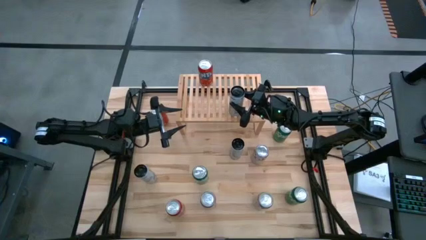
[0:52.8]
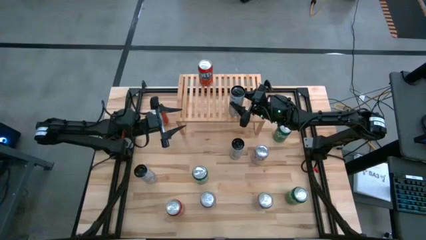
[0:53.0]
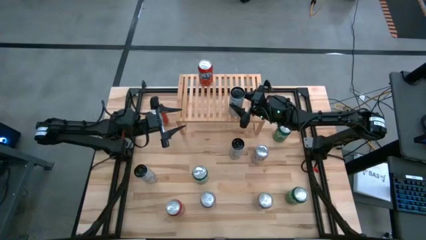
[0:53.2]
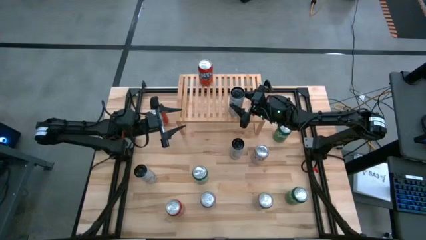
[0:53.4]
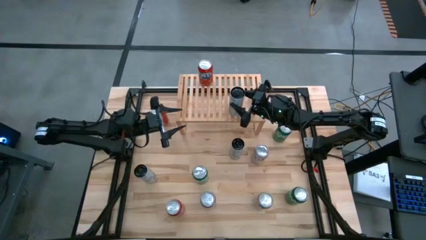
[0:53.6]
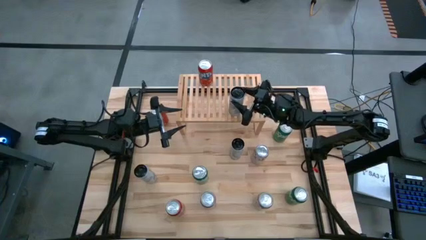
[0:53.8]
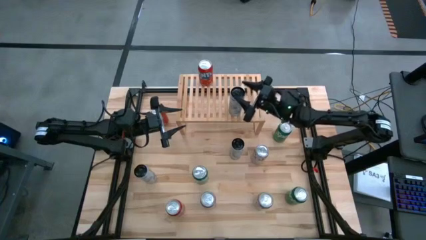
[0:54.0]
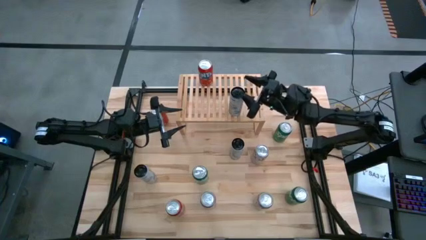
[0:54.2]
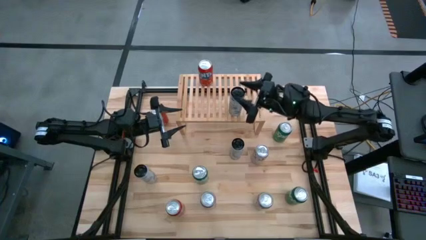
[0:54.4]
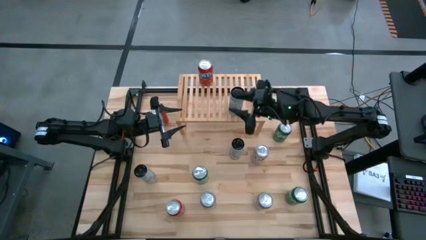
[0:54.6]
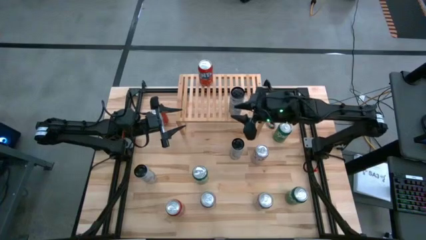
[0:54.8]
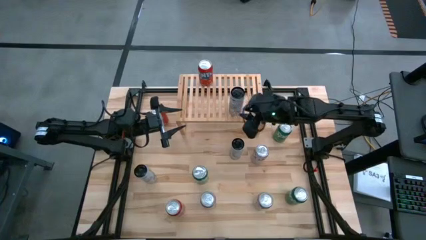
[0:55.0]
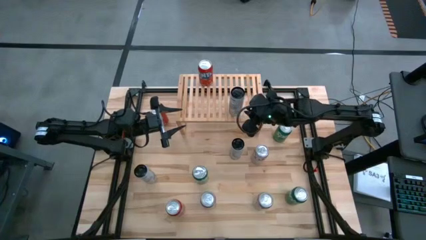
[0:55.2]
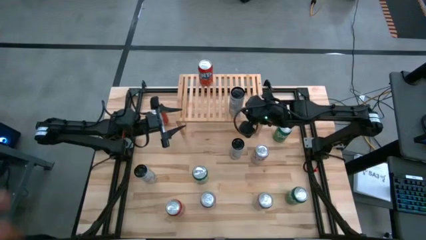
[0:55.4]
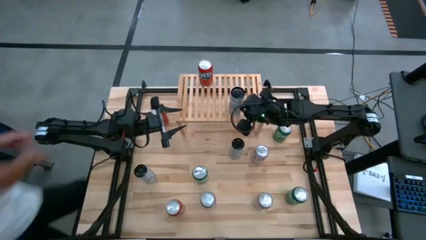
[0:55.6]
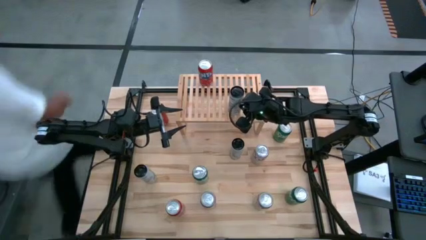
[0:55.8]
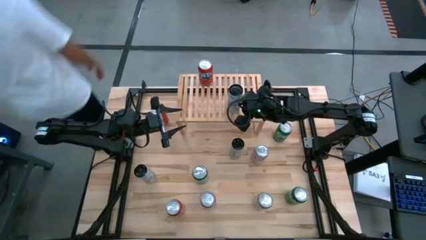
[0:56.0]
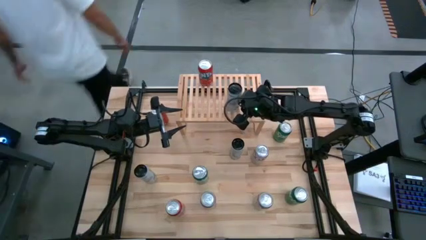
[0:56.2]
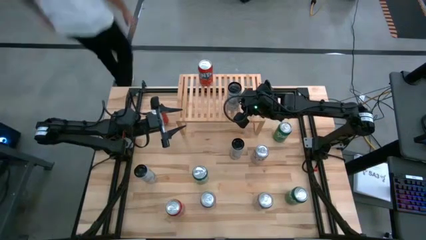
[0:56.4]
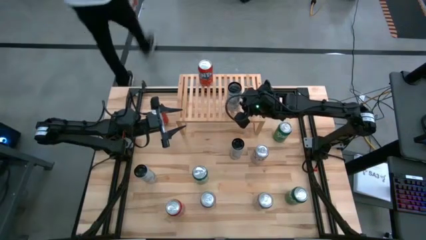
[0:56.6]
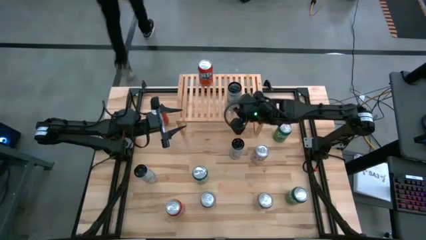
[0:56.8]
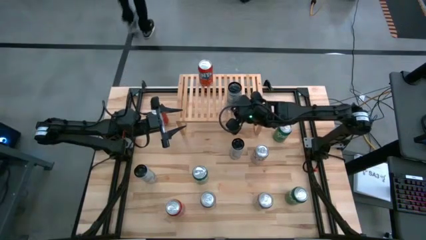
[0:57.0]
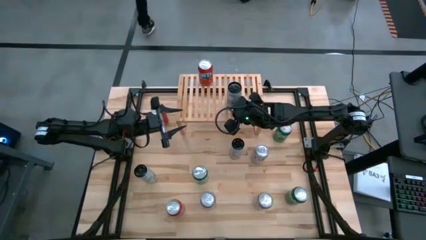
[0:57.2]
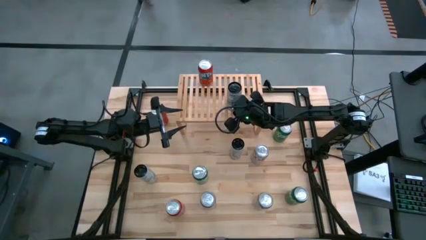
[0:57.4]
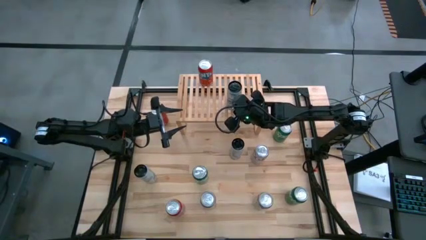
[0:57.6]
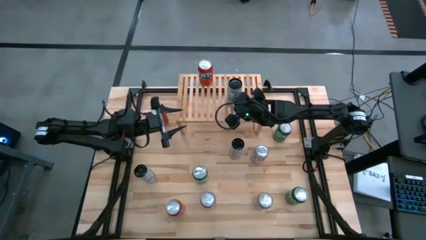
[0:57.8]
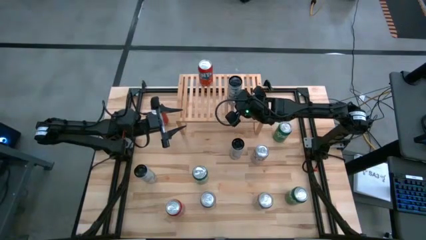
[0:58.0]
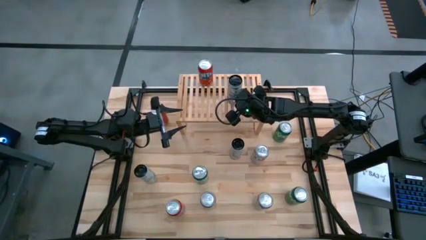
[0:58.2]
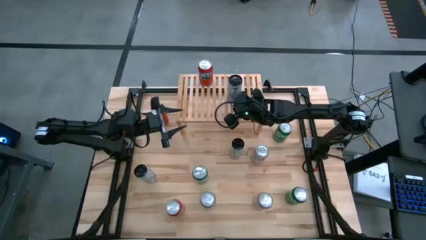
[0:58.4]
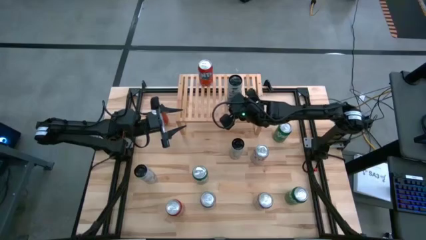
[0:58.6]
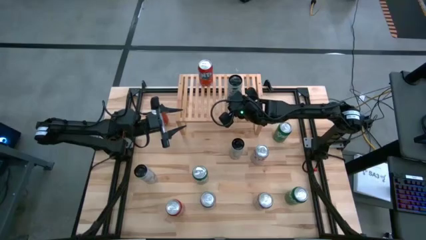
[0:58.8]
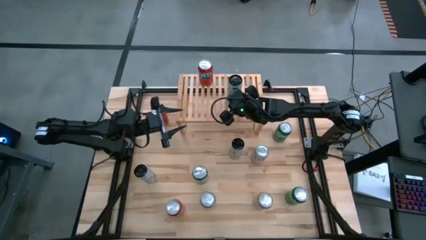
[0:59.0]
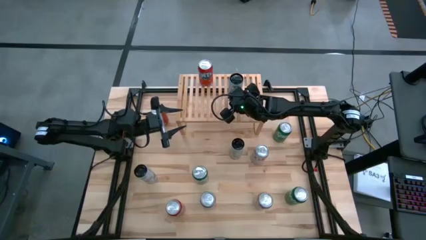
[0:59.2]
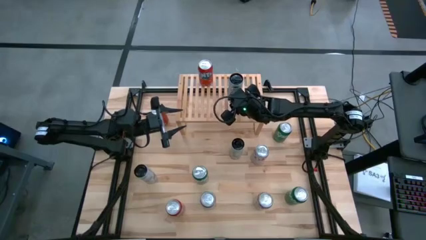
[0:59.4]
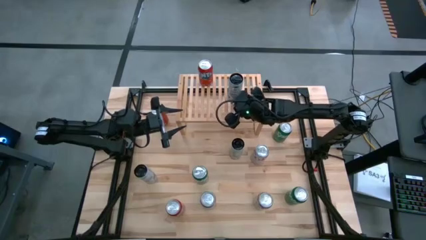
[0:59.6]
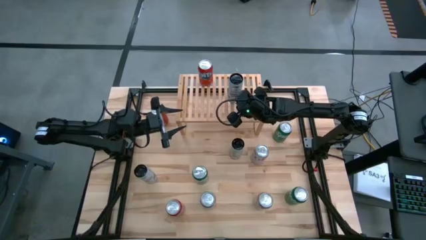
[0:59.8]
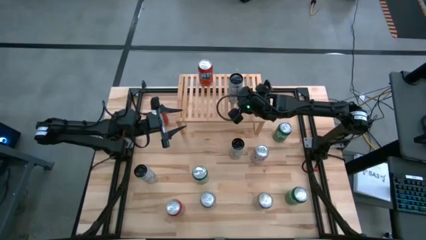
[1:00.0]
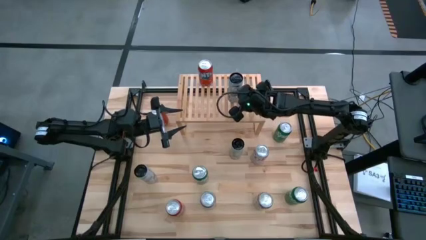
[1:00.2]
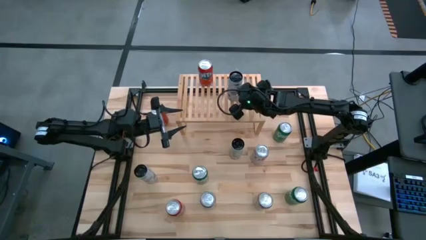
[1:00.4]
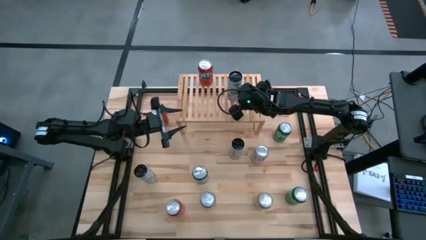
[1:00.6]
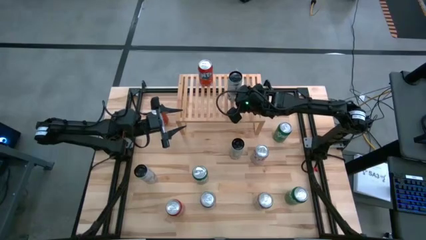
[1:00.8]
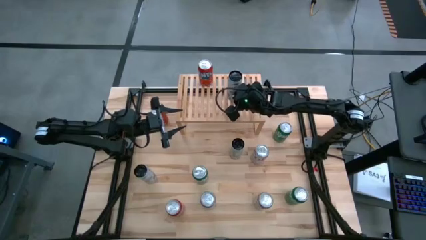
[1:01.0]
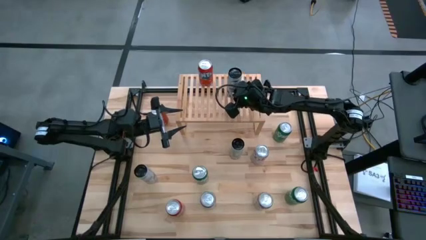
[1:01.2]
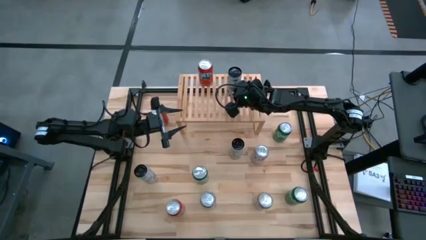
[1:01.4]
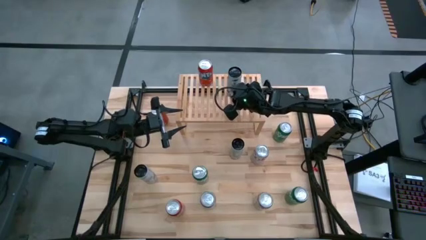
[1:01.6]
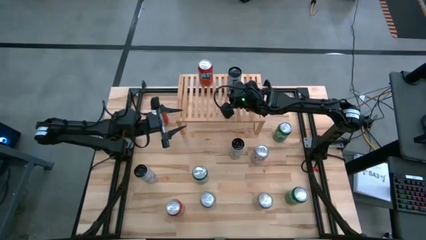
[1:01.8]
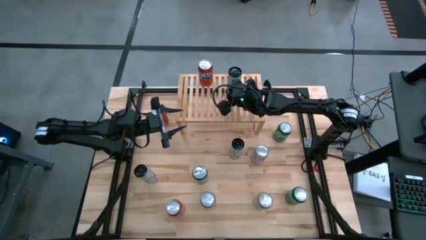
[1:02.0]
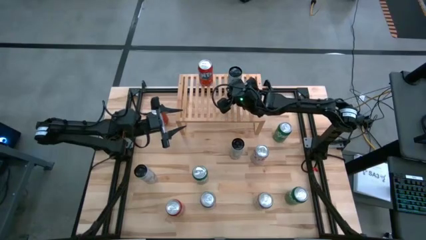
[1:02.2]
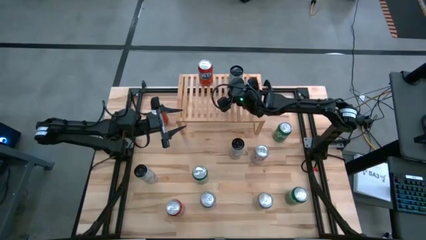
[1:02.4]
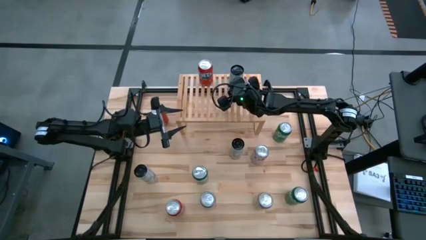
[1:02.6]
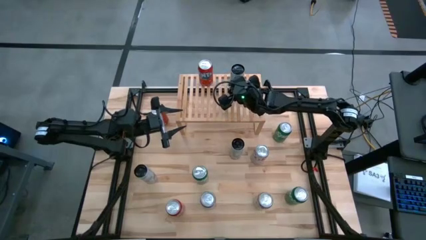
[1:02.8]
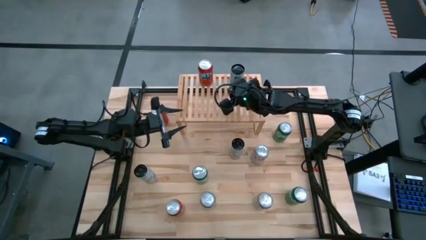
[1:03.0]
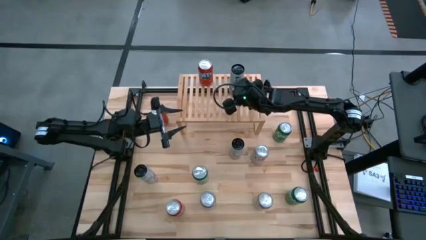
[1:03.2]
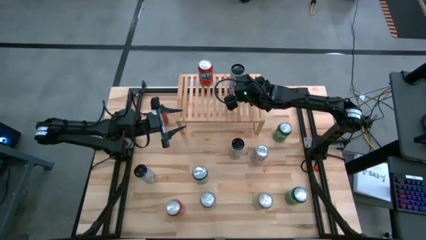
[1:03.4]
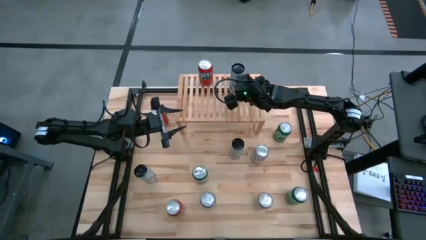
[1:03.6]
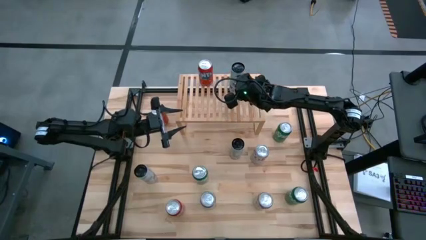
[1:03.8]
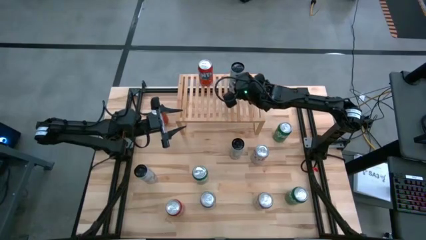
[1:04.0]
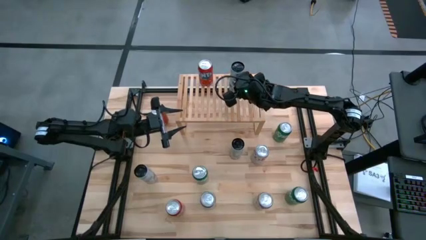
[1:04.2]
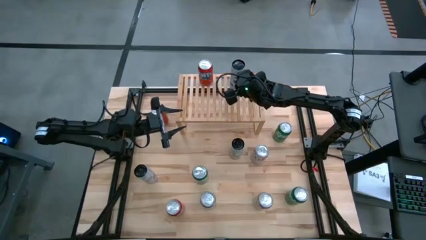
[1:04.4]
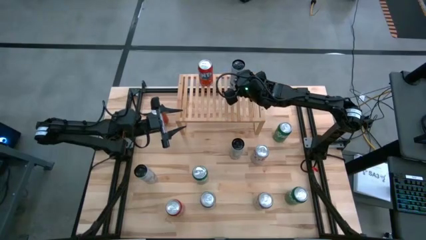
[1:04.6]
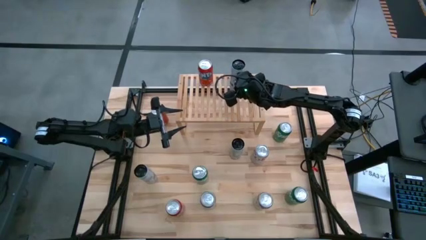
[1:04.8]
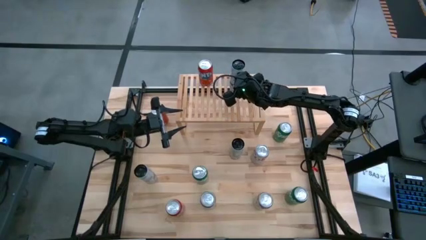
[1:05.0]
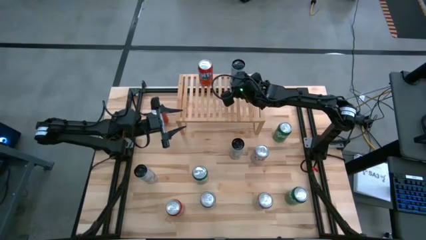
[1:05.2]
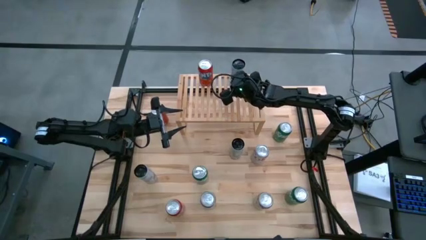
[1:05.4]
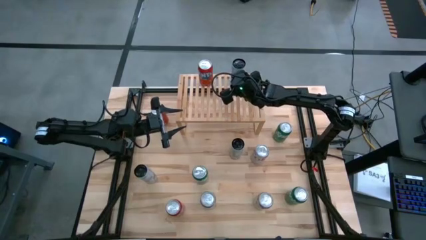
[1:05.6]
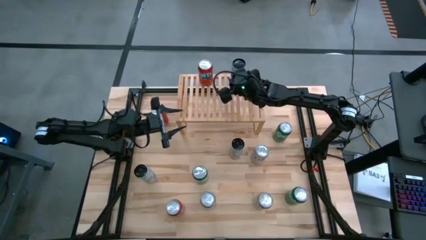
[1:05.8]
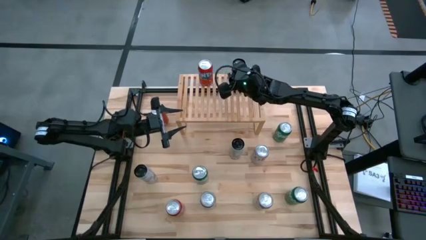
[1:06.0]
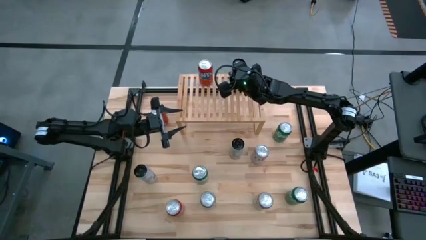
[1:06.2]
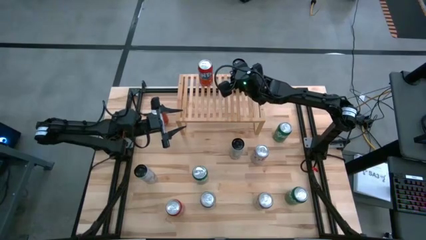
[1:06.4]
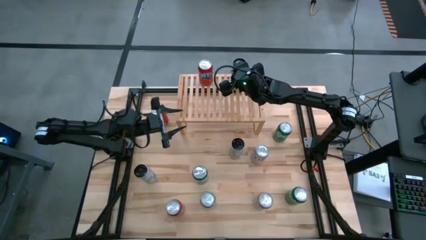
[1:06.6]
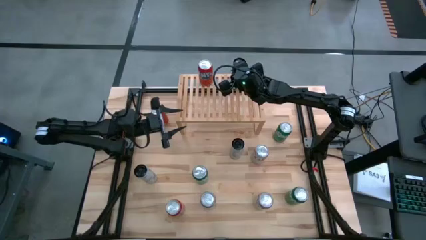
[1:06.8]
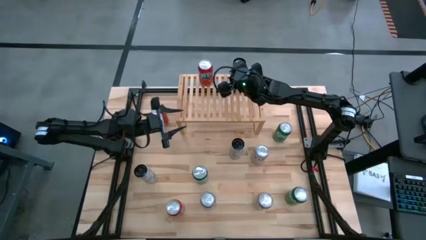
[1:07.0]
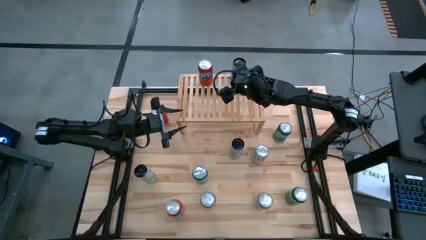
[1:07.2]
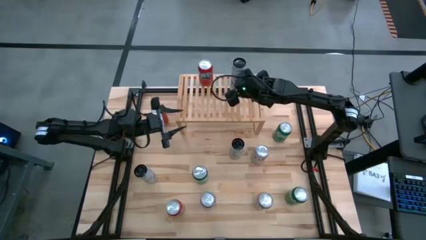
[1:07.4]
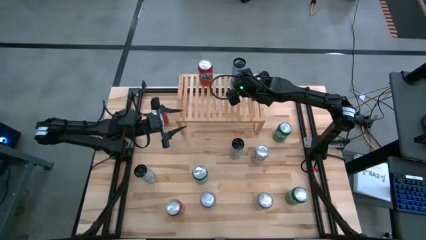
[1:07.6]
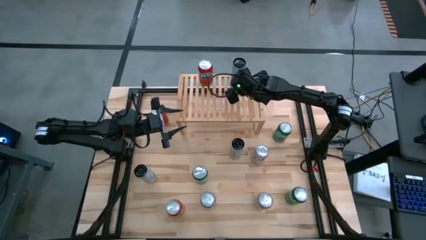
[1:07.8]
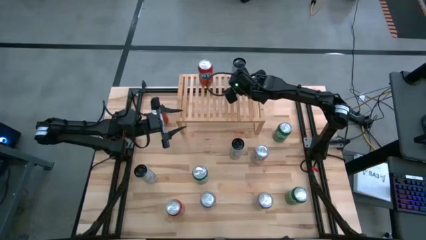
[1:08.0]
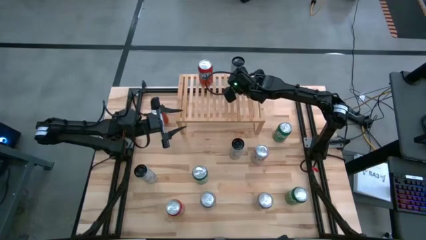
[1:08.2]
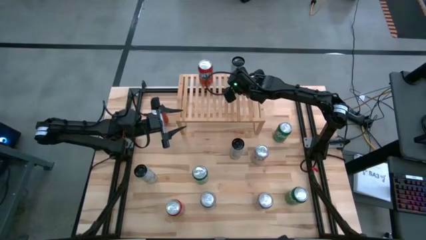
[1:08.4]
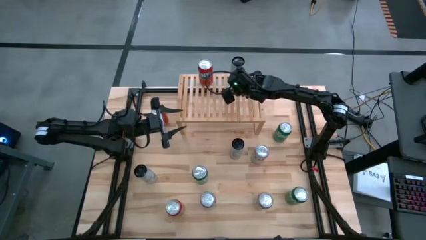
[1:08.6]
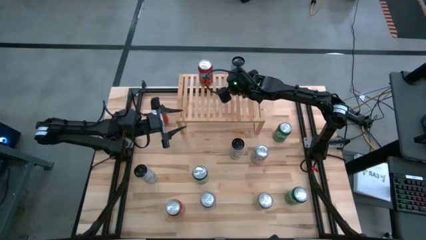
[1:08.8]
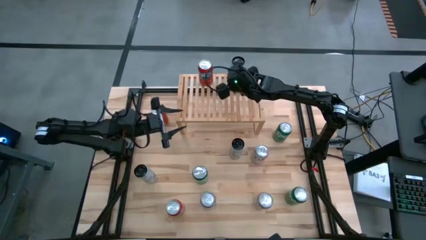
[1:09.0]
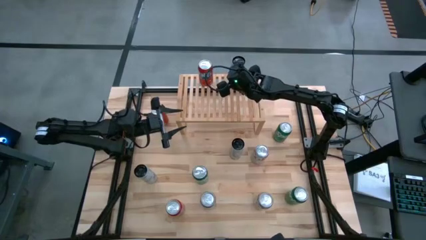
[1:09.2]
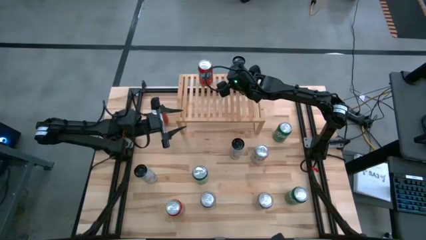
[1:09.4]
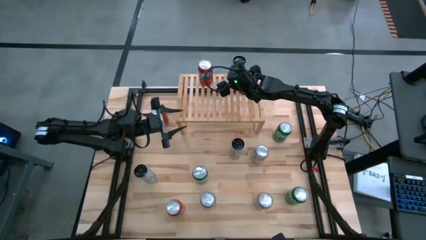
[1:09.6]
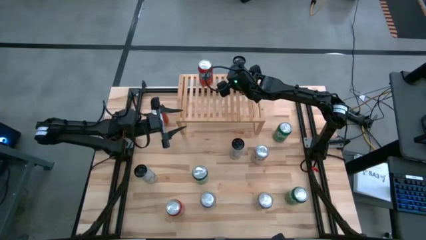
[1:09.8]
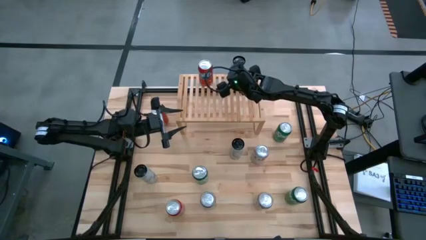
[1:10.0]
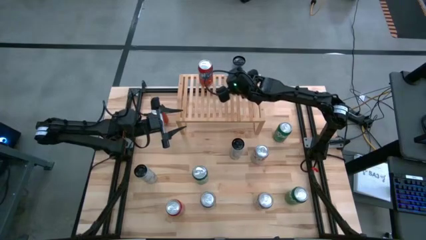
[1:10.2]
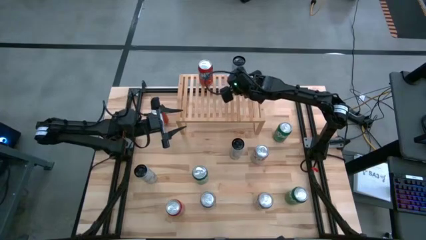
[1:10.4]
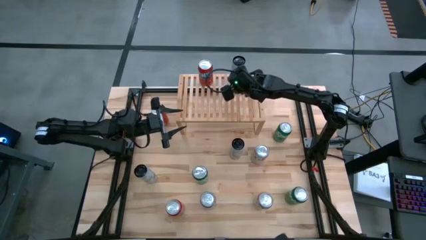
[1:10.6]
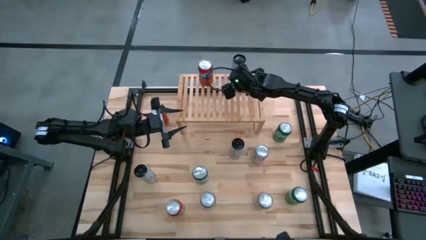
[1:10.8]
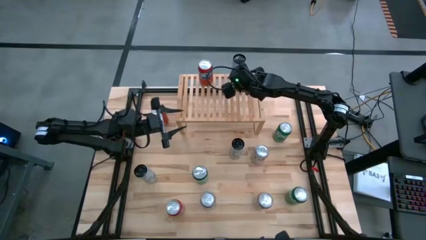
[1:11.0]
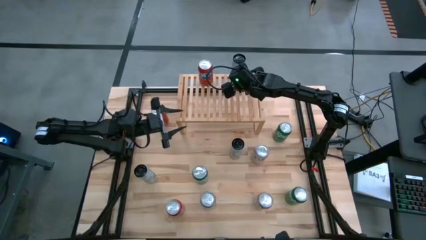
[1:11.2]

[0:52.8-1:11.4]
Task: Place canned beverage on shelf
Put the white blue soda can on the shelf
